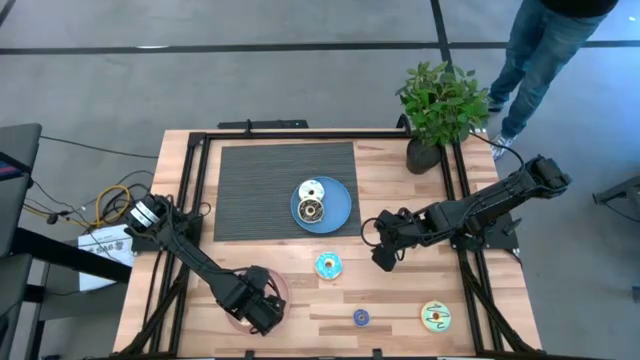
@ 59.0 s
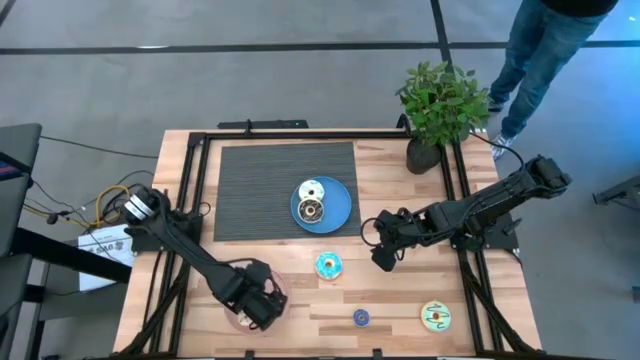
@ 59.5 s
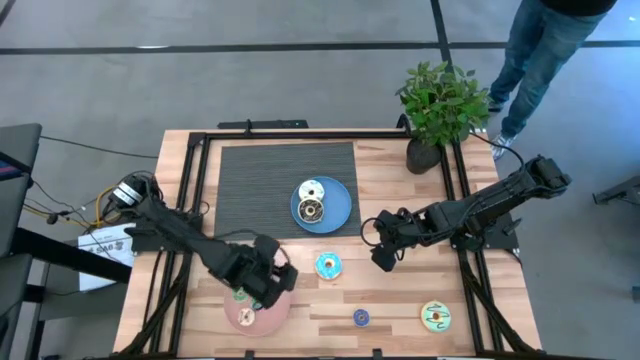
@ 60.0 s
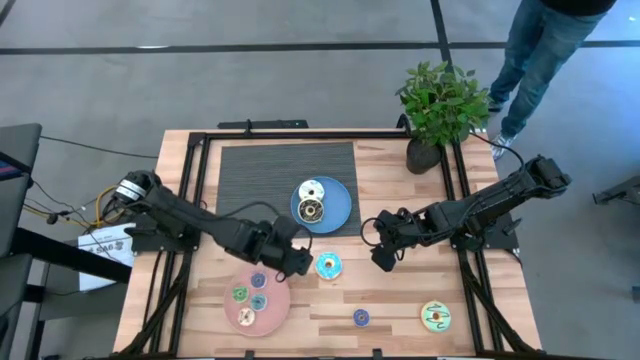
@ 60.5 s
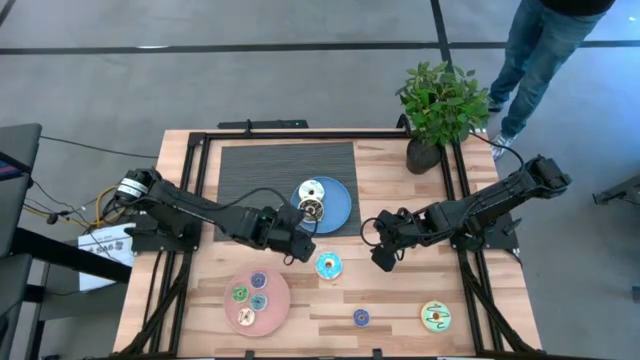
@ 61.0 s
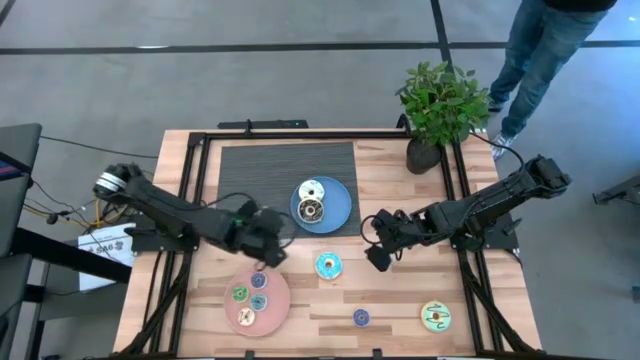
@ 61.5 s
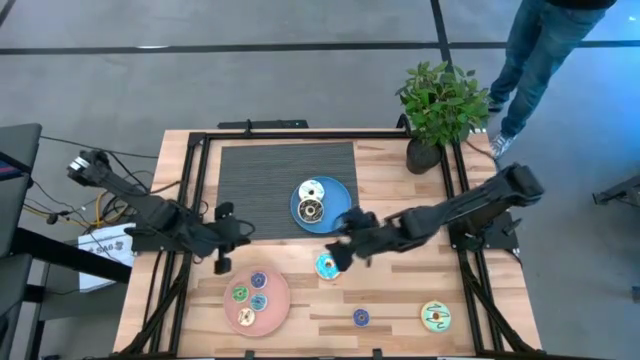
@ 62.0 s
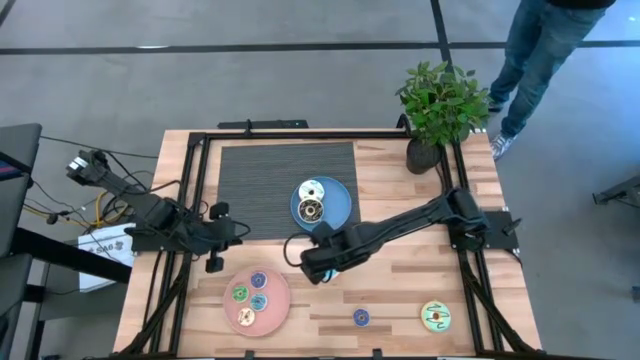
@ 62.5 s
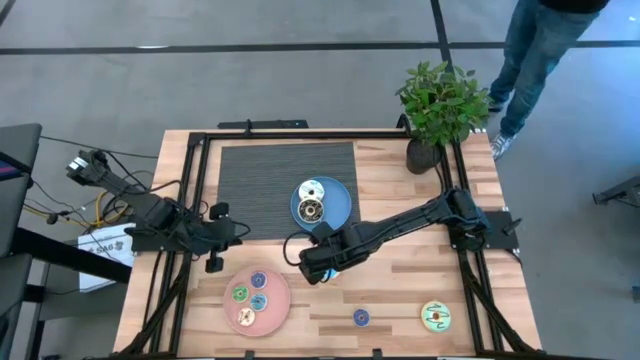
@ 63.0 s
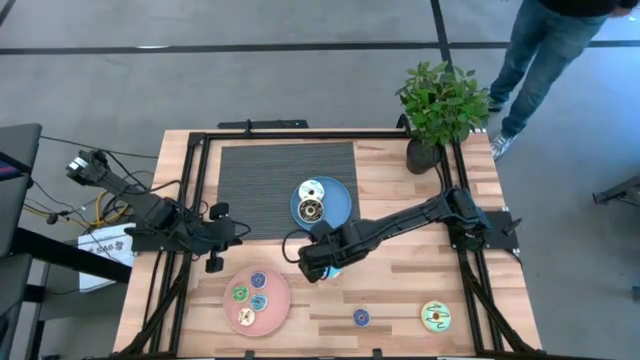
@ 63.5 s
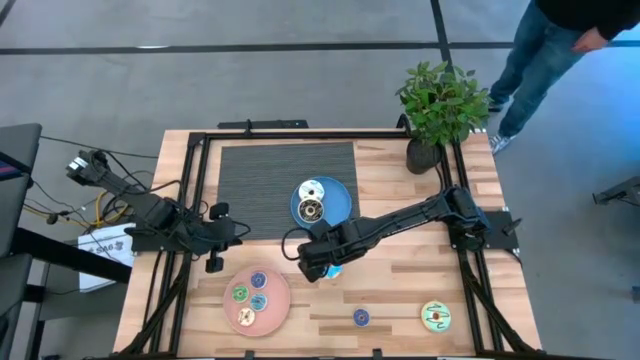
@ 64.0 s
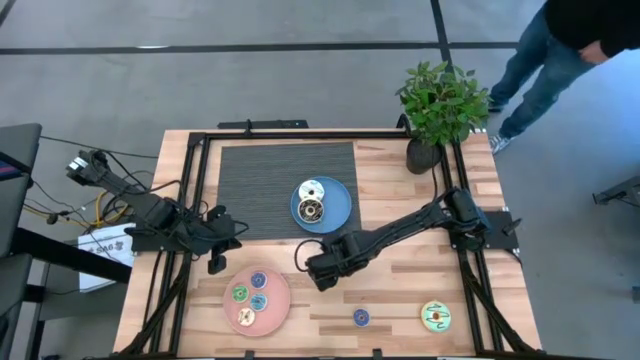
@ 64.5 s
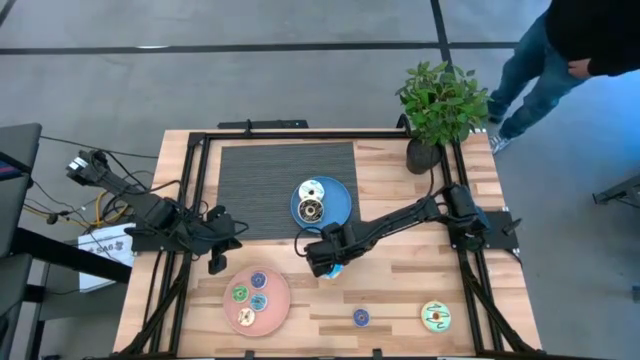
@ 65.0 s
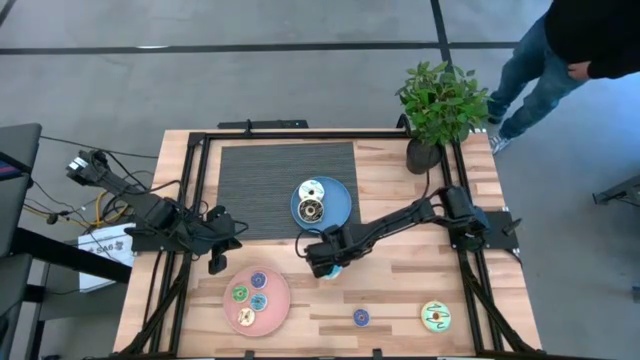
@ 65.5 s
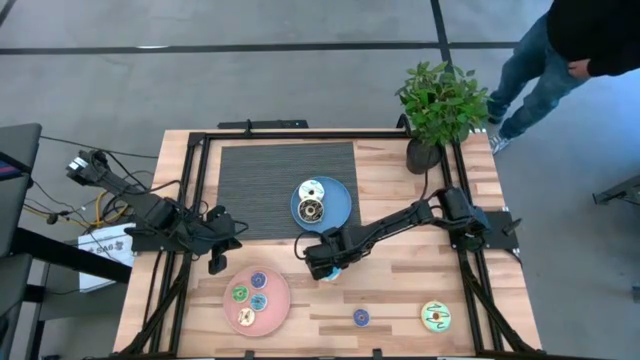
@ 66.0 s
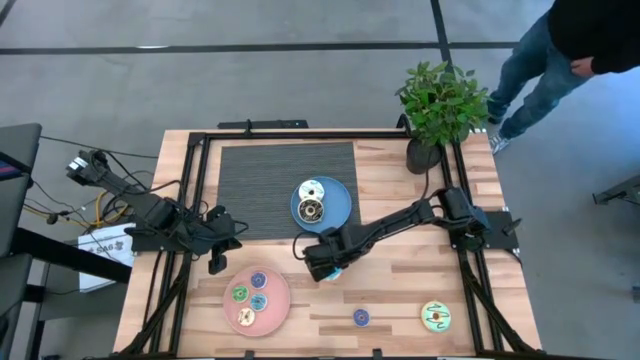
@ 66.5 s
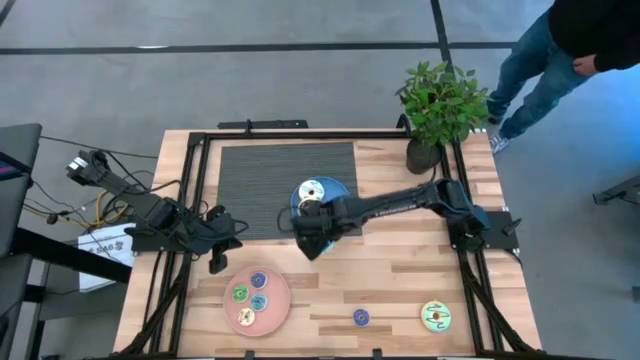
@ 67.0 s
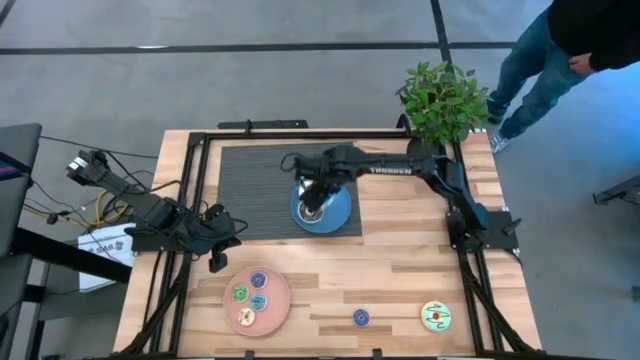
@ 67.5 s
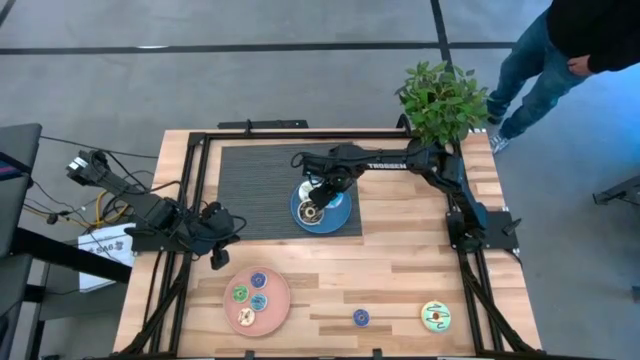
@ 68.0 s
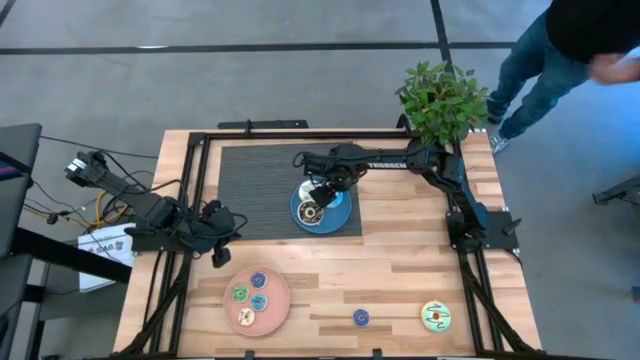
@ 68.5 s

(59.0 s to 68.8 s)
Task: Pick & Place donuts
Put the large blue donut on the blue plate

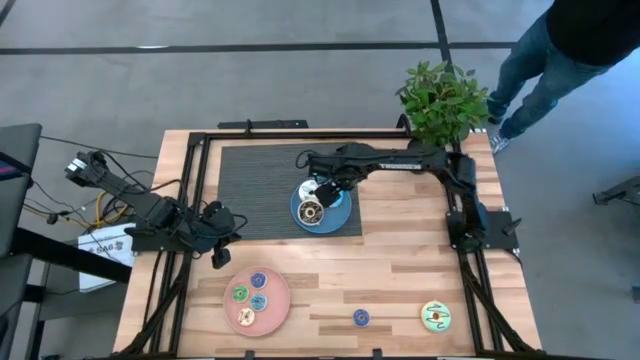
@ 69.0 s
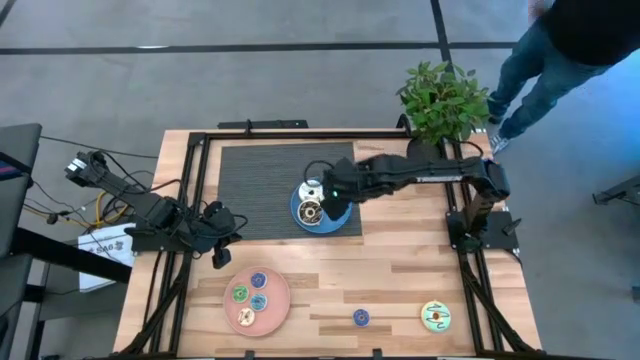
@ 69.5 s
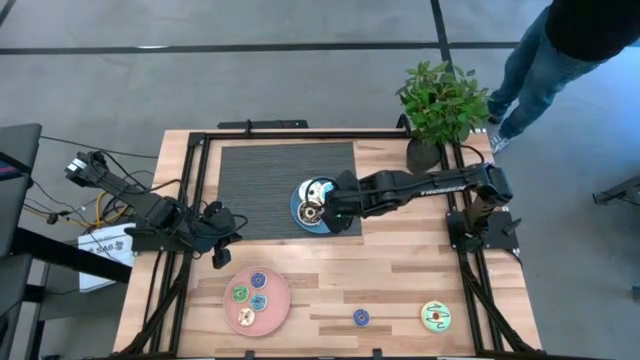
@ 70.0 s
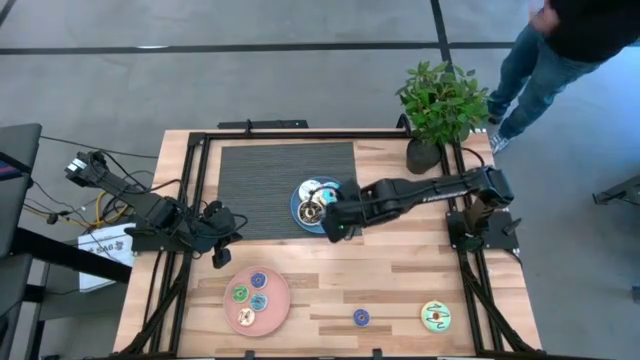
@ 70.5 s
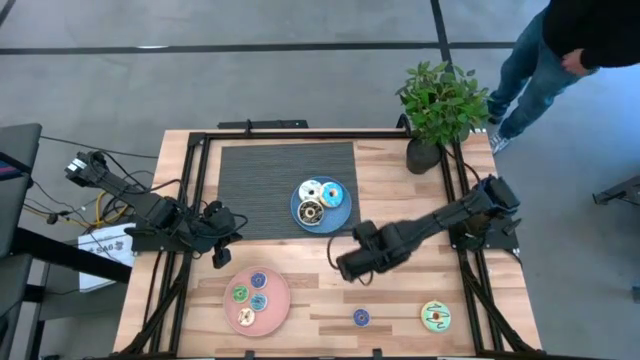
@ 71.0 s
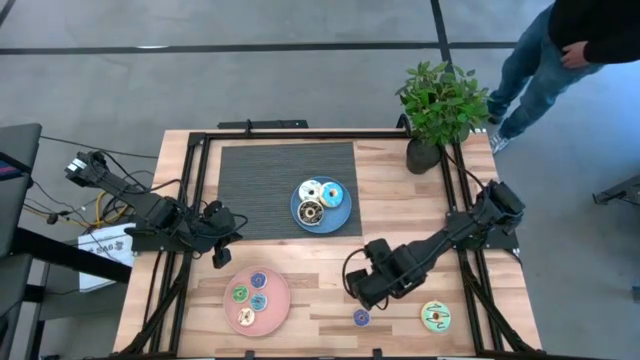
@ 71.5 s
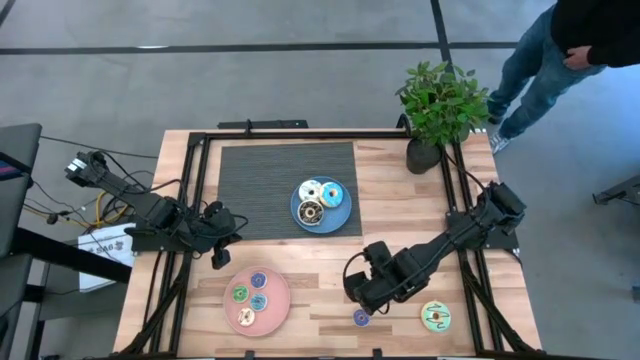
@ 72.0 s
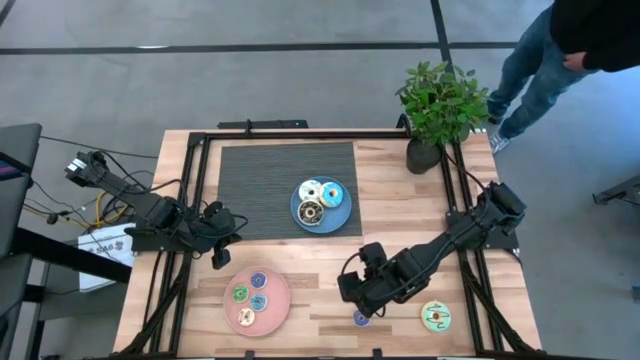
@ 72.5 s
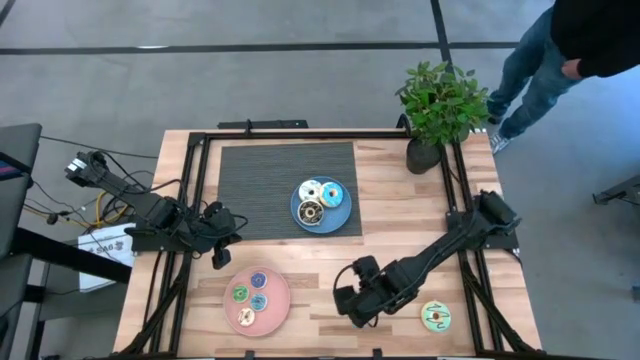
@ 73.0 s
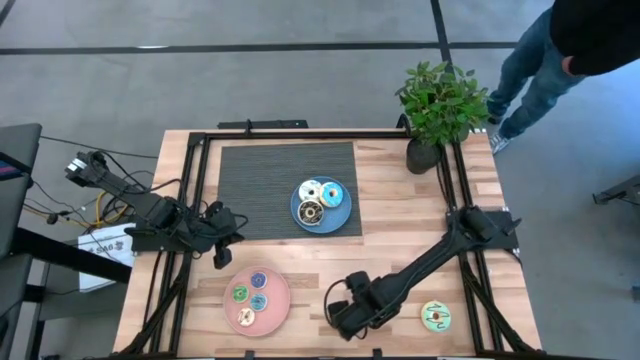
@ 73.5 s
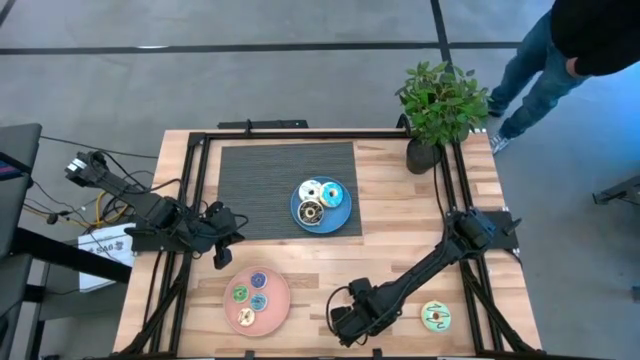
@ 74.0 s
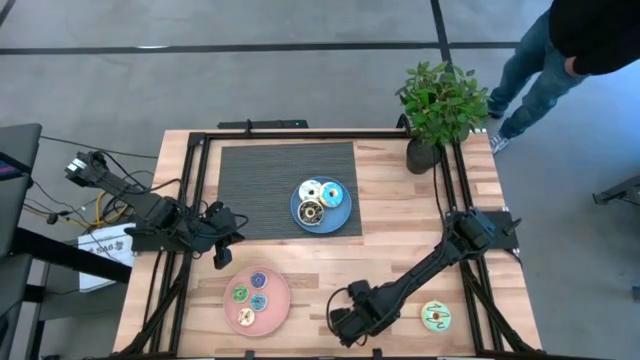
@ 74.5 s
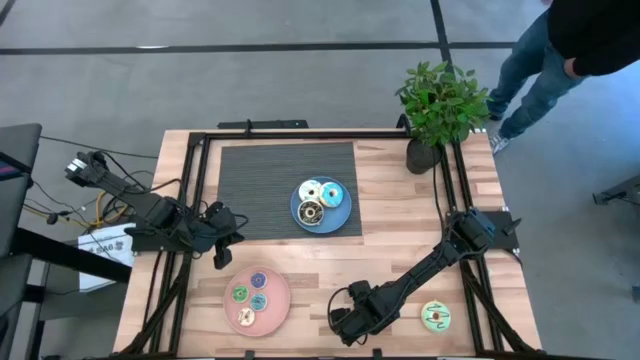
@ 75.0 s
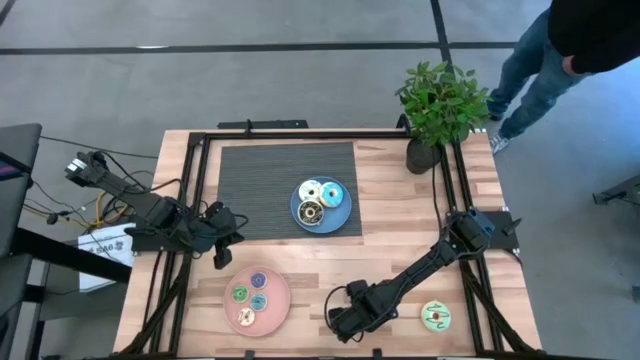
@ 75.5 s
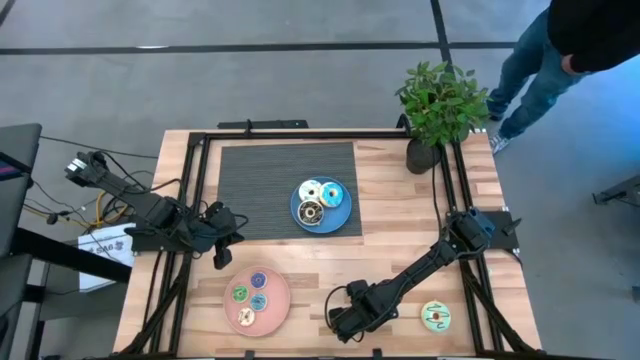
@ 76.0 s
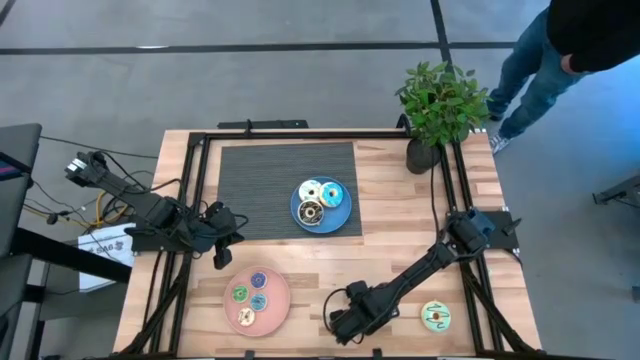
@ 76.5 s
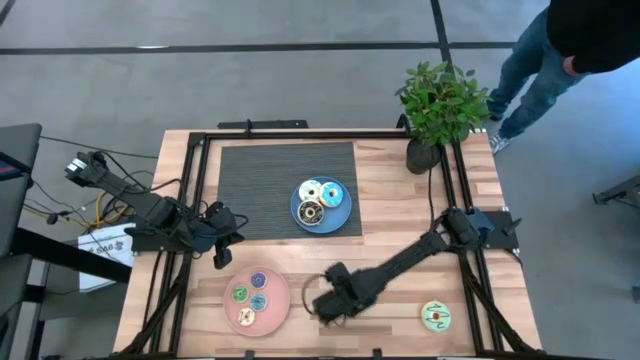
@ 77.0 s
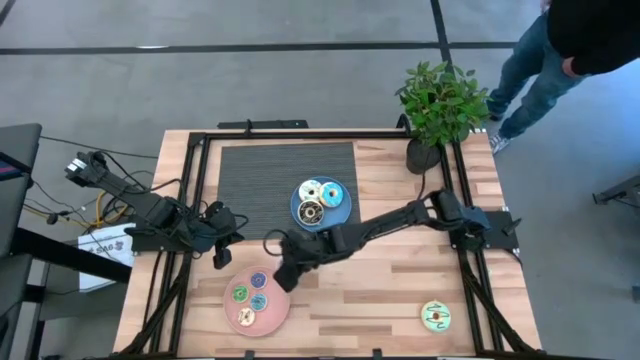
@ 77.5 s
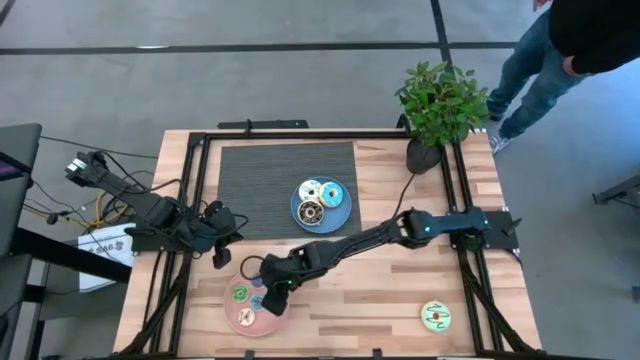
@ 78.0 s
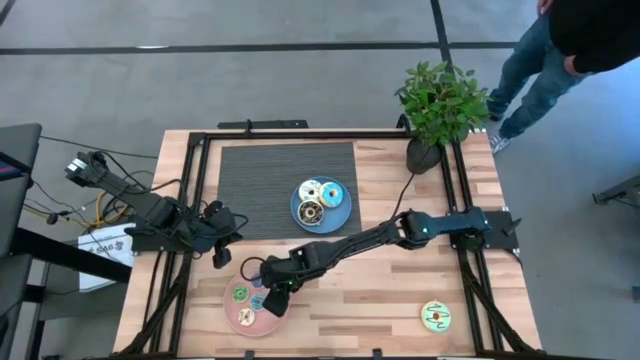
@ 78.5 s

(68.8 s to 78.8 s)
Put the small dark blue donut on the pink plate

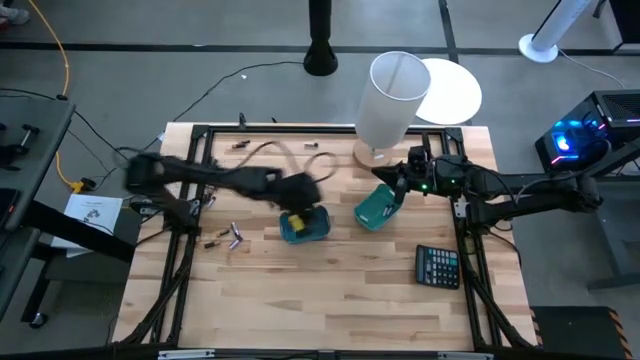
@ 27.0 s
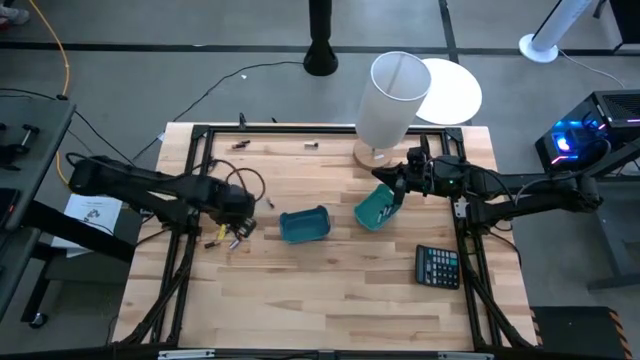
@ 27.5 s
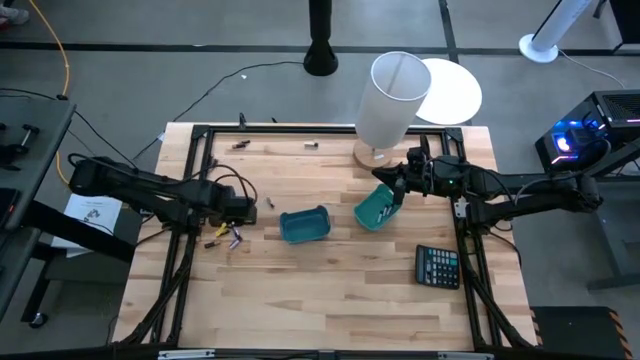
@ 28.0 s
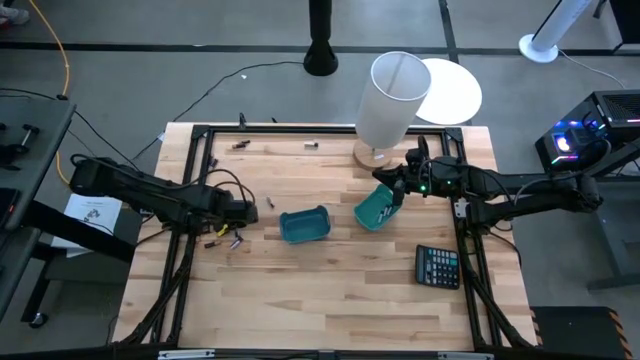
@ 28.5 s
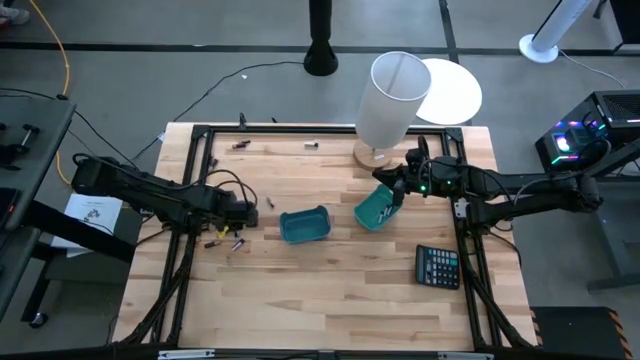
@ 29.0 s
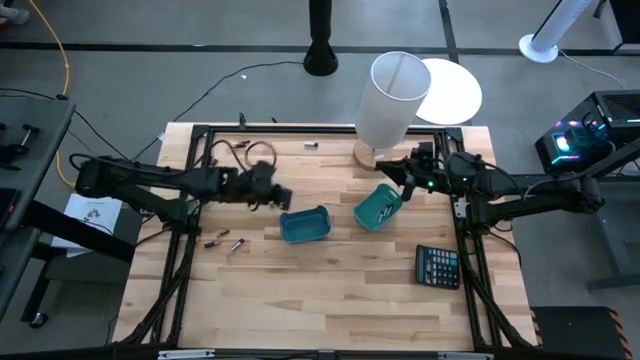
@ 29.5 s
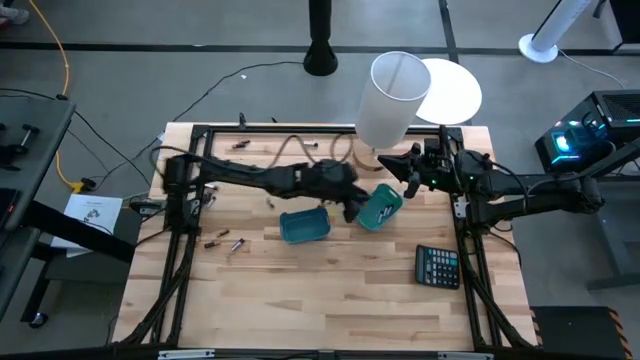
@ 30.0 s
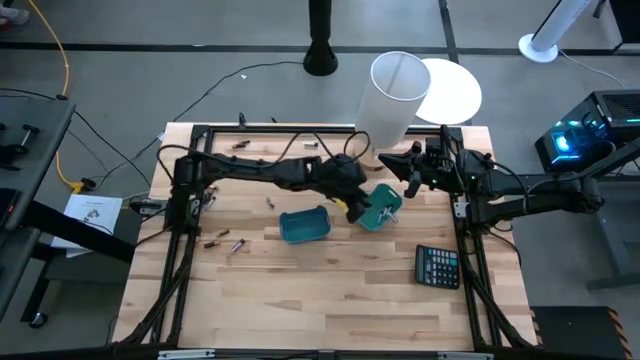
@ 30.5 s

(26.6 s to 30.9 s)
Task: Sort batteries
Put the silver battery into the green bin
